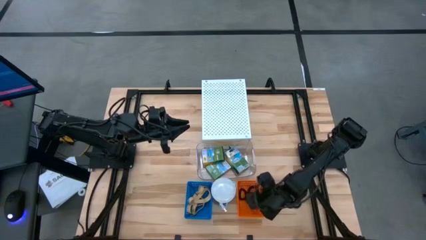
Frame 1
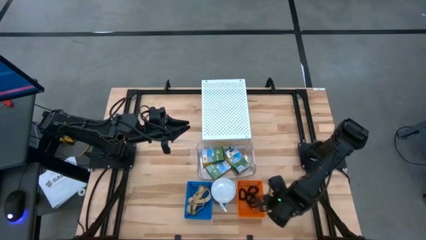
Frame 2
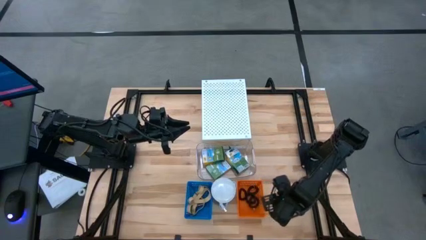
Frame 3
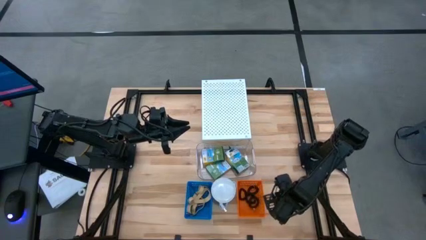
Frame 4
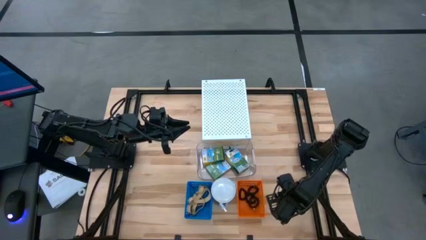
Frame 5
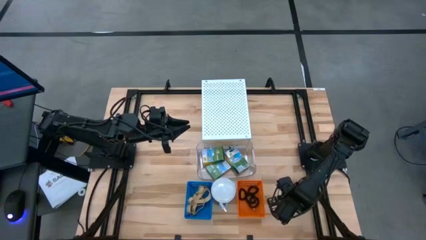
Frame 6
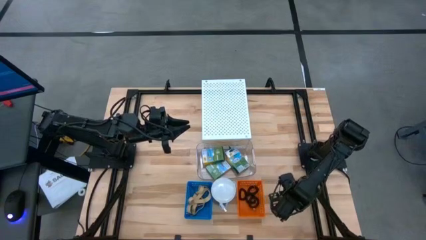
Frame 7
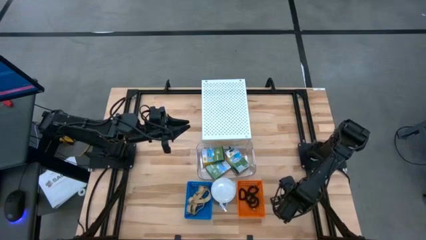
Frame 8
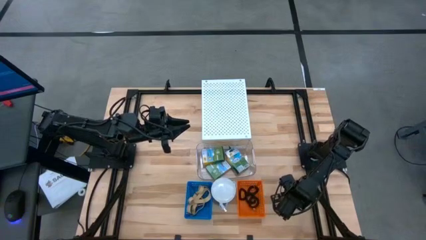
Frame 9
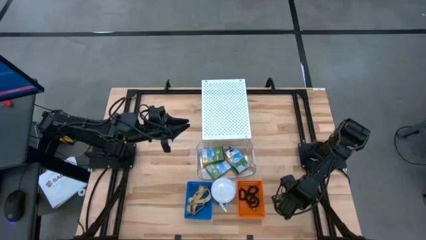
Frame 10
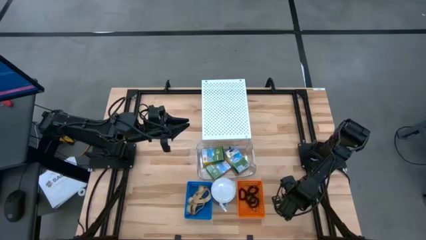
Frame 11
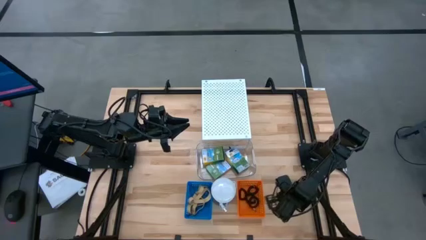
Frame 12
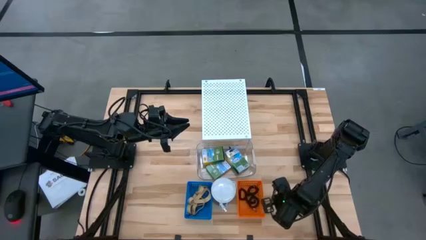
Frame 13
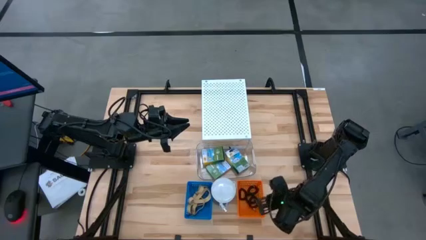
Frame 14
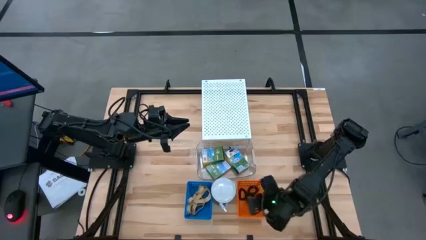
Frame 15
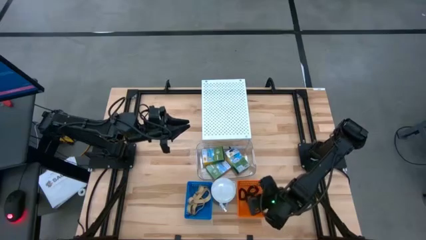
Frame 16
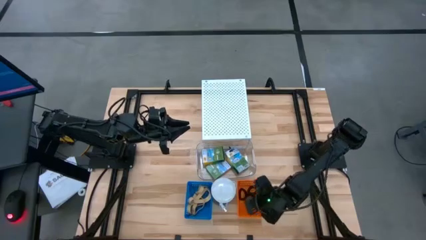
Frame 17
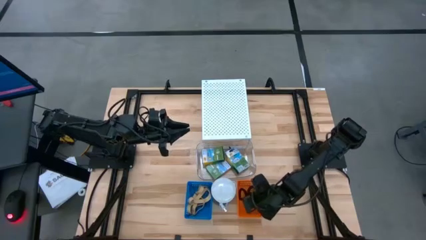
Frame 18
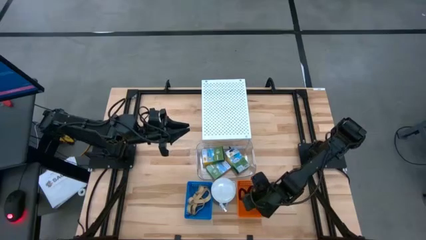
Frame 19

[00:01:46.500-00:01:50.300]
Task: Pick & Place Office Desk Supplies
Put the black spring keychain into the orange bin

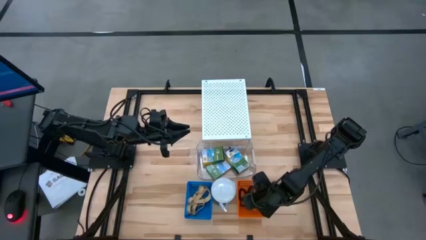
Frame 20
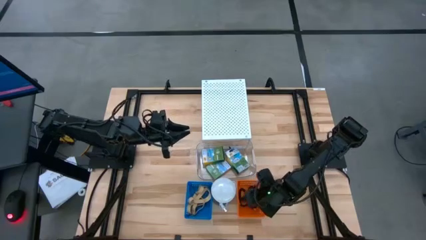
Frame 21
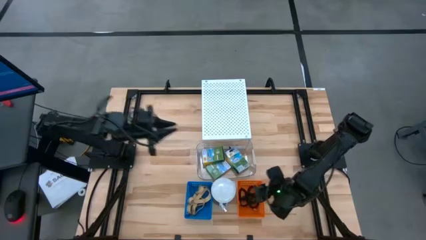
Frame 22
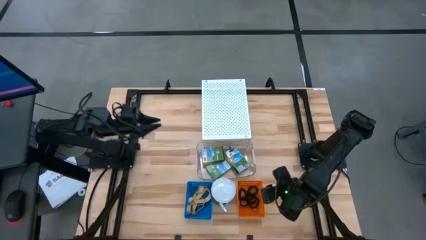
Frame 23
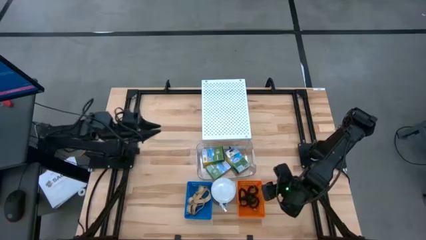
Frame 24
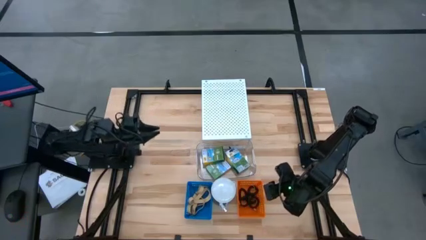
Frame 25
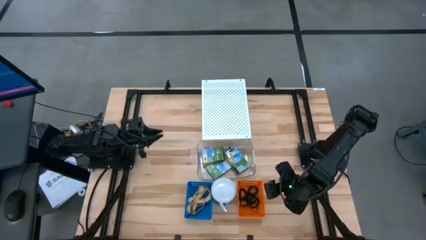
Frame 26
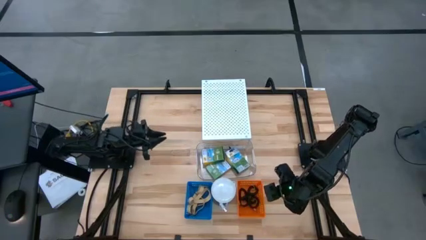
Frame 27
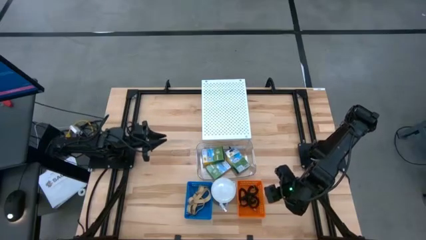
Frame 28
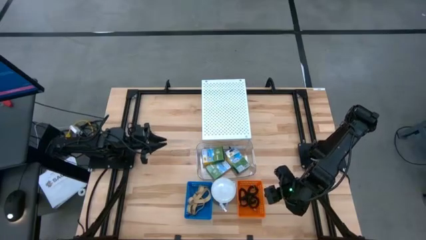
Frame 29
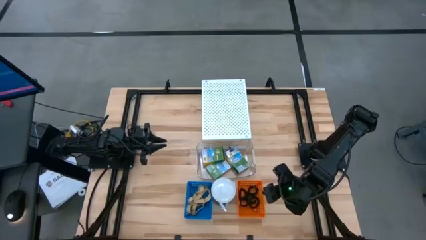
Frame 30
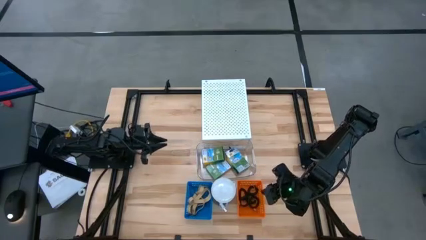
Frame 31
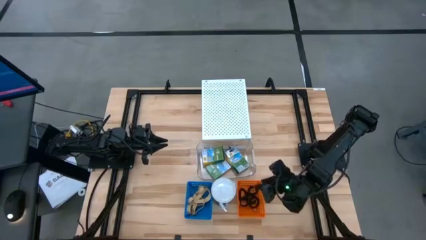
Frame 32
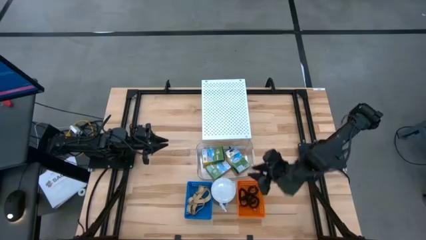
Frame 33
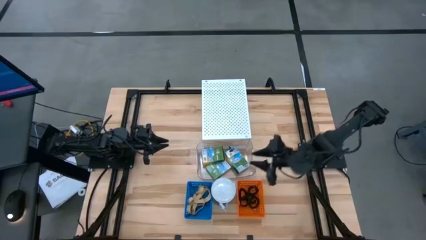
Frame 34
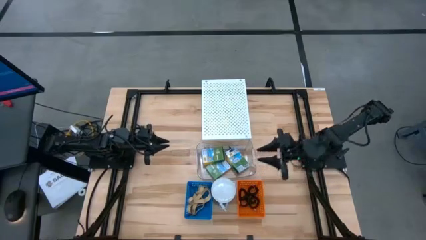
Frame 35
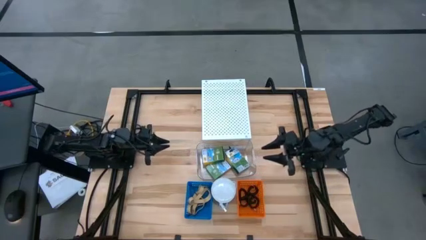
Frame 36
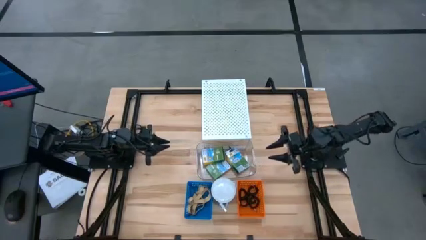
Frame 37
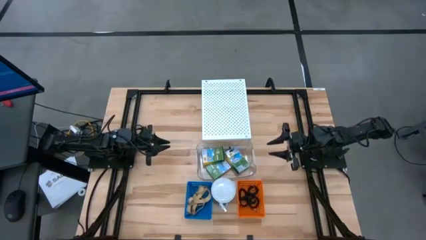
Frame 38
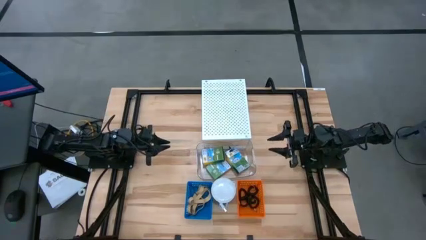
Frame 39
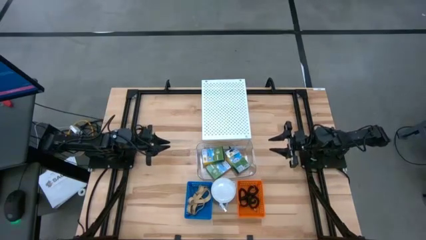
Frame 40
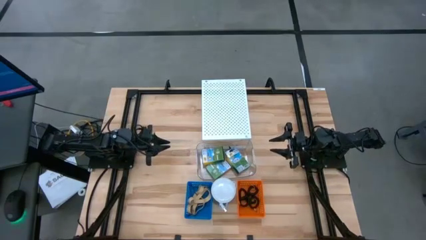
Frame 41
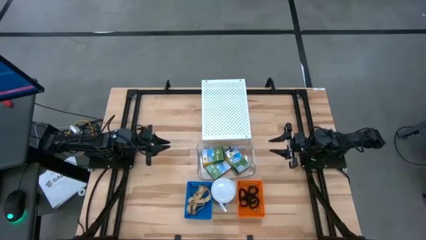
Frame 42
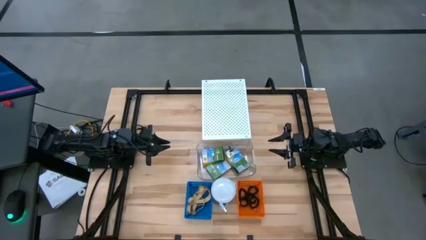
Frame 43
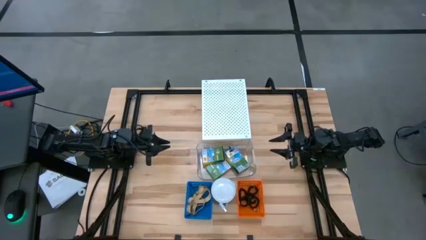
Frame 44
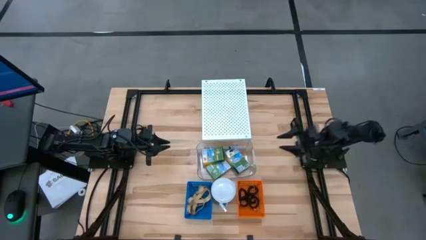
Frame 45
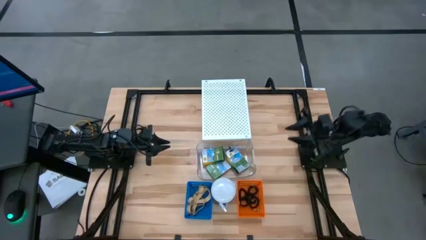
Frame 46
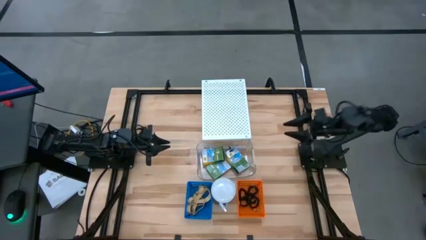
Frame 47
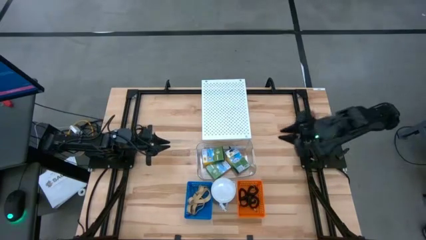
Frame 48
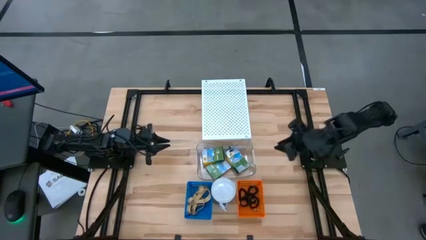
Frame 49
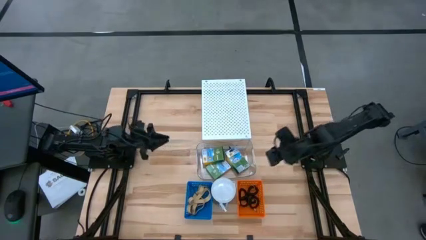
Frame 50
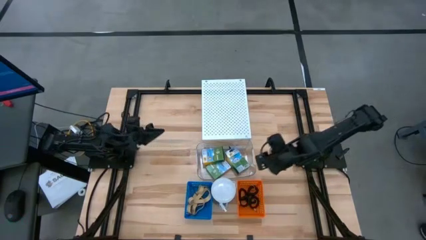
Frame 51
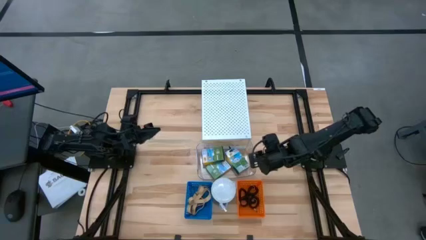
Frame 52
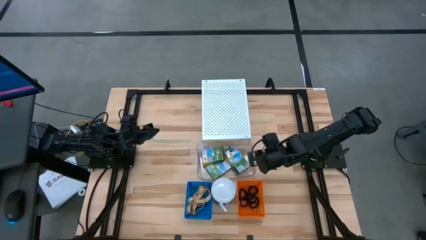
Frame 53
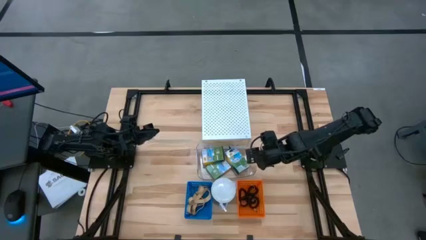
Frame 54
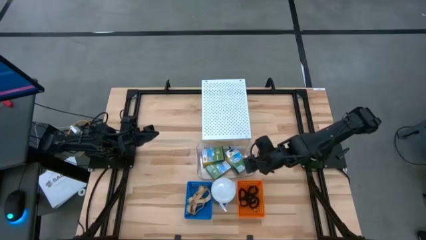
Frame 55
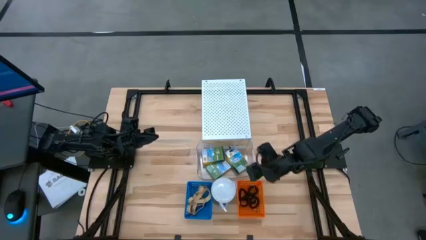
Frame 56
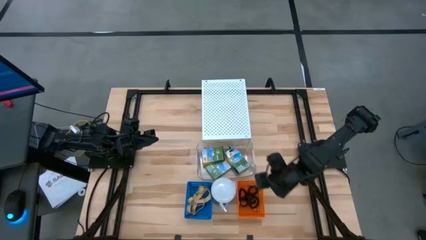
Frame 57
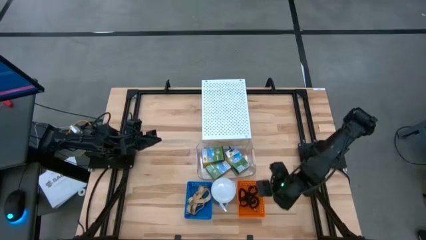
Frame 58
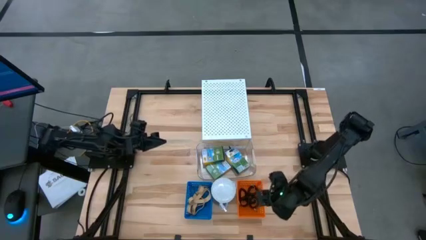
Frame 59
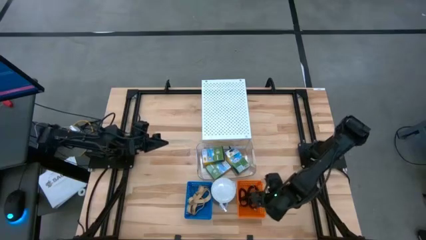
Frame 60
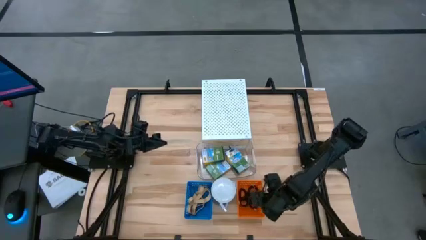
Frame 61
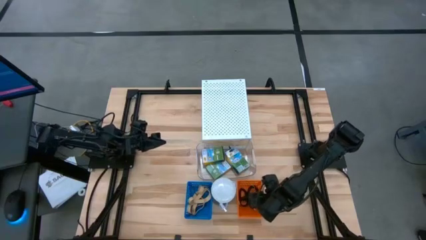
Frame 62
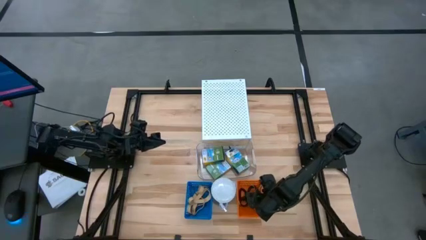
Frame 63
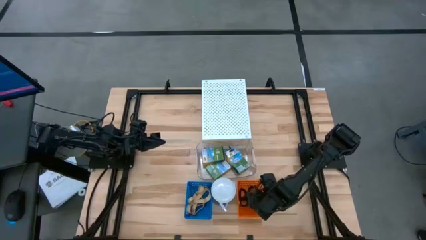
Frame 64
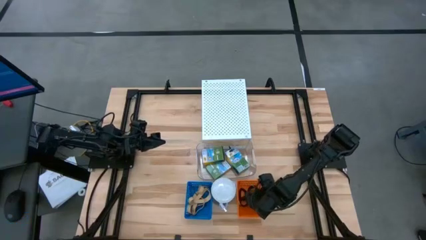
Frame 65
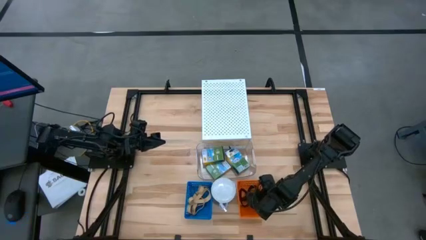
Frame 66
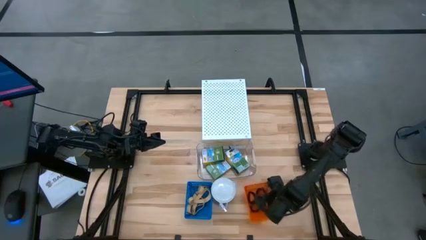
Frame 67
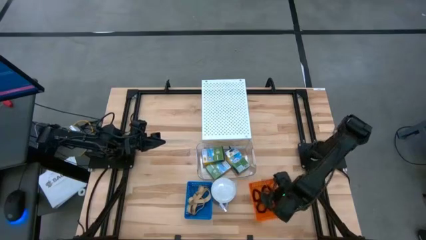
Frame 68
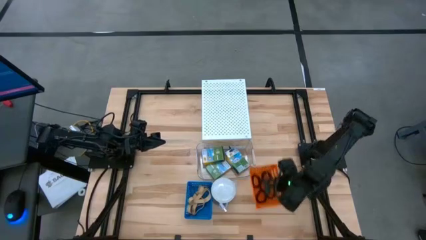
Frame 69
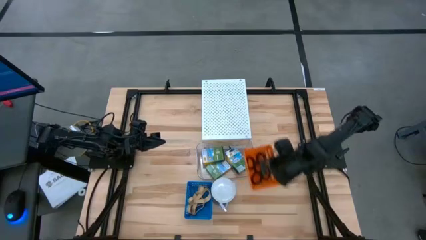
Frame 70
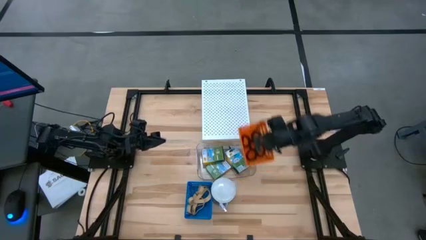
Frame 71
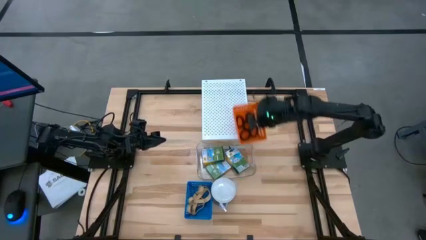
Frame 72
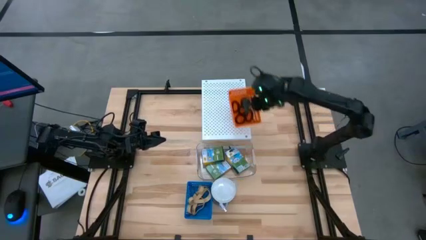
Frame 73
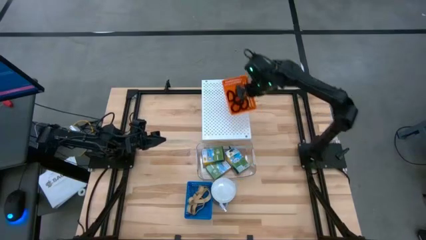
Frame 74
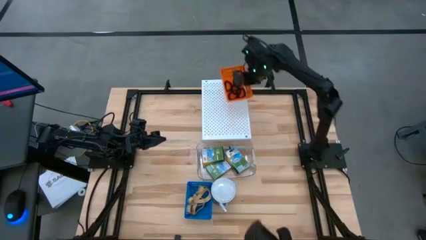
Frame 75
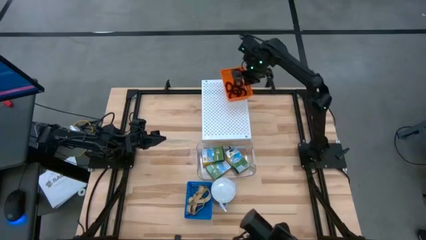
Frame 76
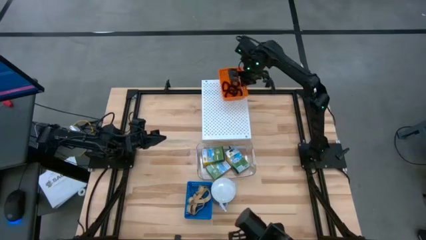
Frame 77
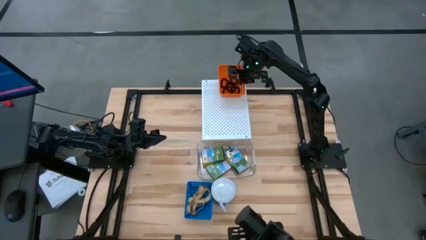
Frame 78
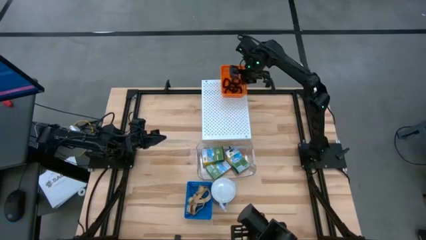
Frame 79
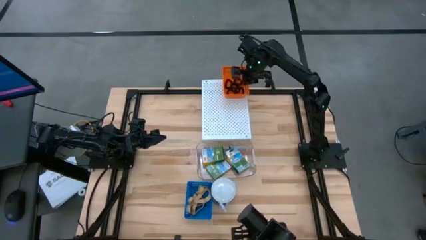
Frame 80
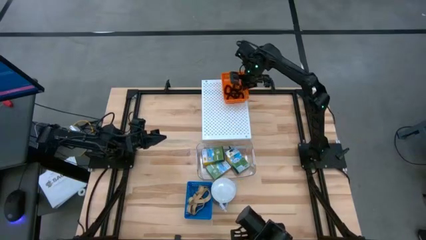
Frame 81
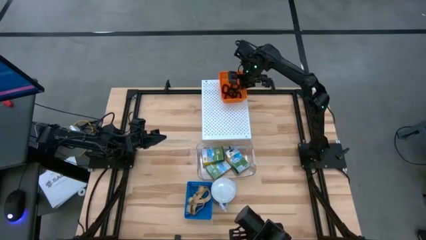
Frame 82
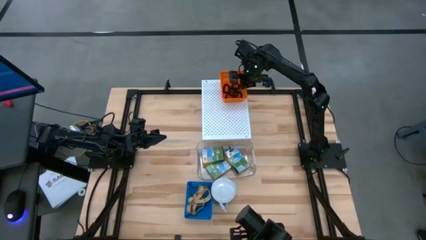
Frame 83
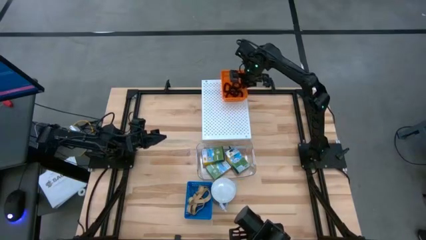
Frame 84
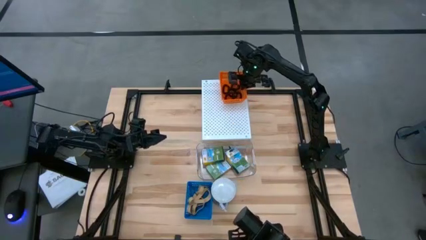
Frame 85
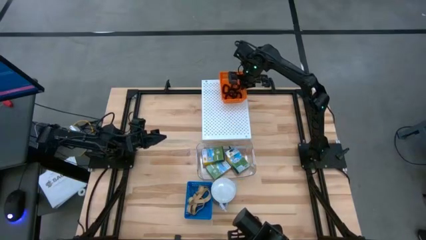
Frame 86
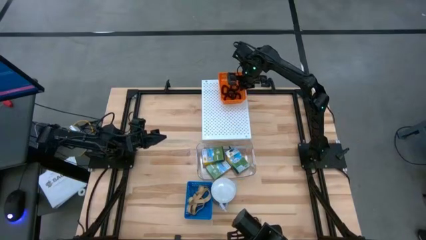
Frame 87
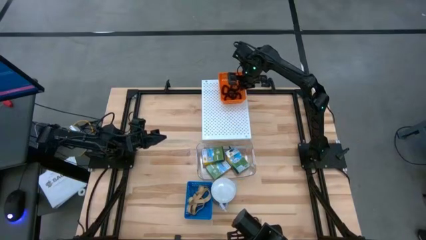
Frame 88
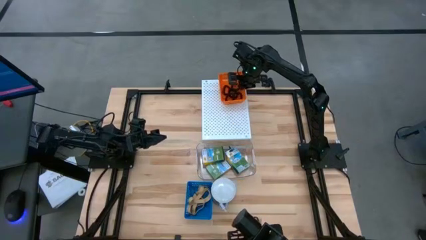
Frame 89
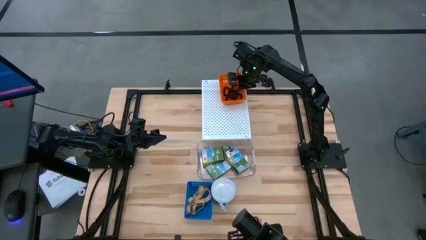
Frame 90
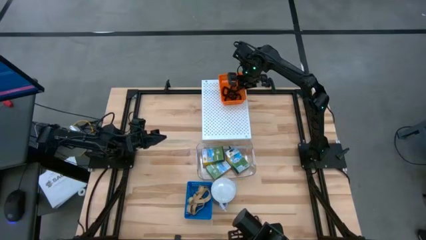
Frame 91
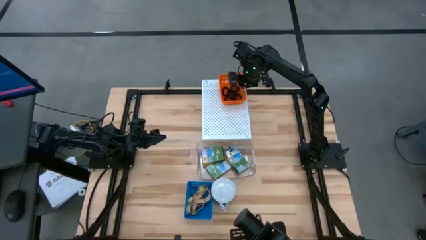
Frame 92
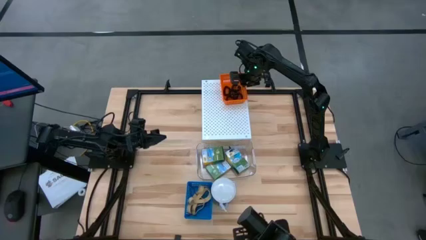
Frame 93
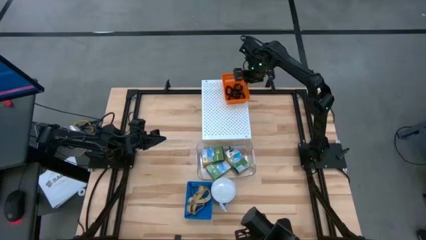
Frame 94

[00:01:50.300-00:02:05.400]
Put the orange bin with spring keychains on the shelf
